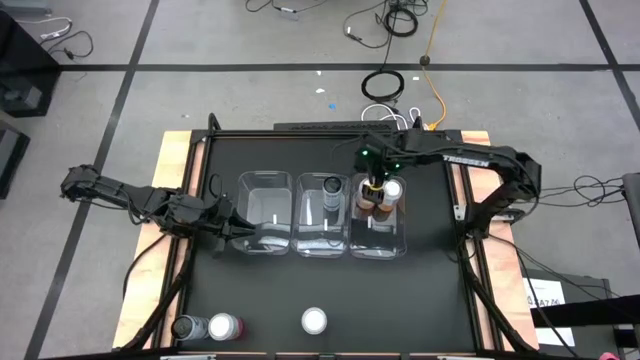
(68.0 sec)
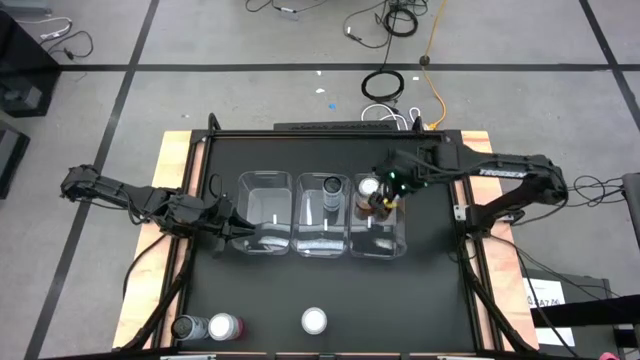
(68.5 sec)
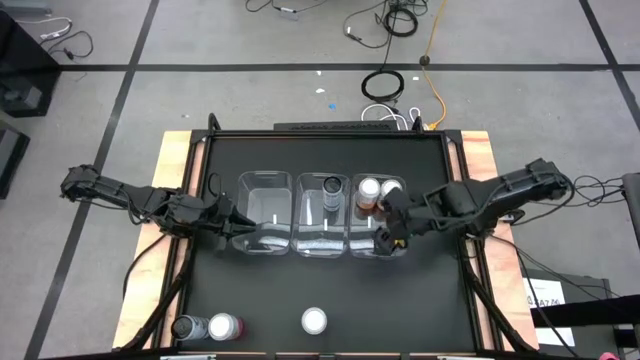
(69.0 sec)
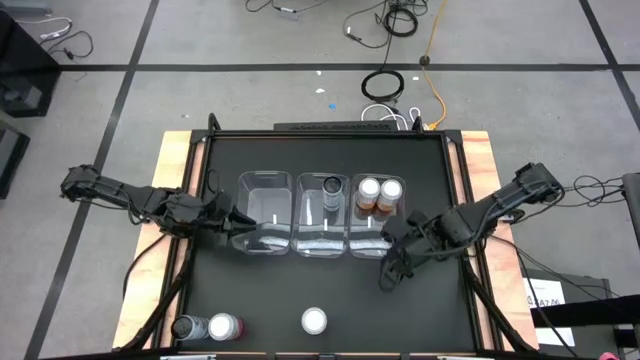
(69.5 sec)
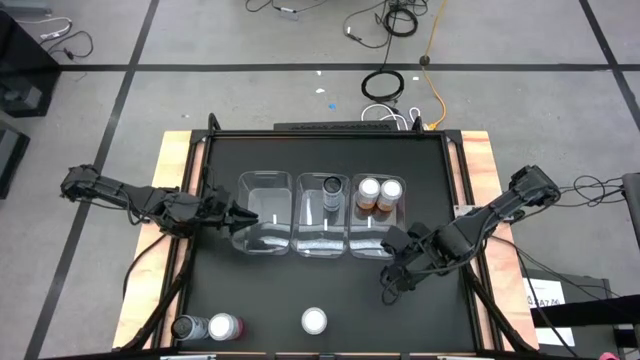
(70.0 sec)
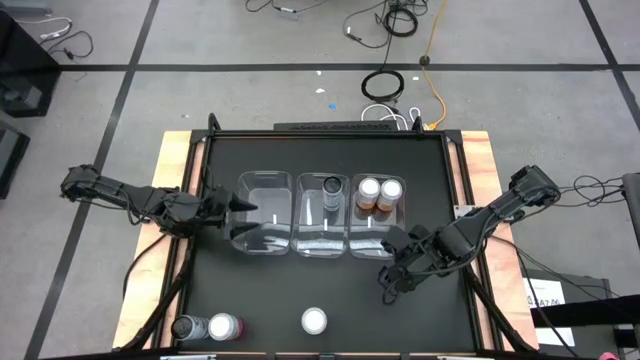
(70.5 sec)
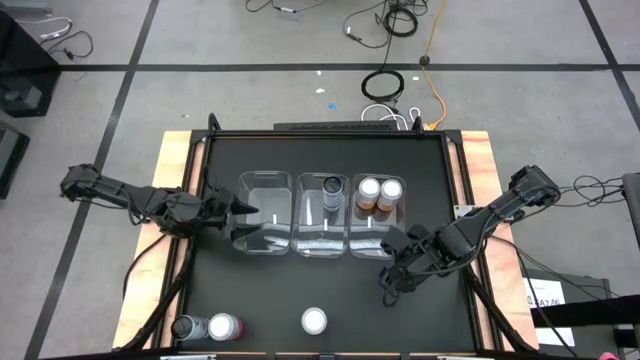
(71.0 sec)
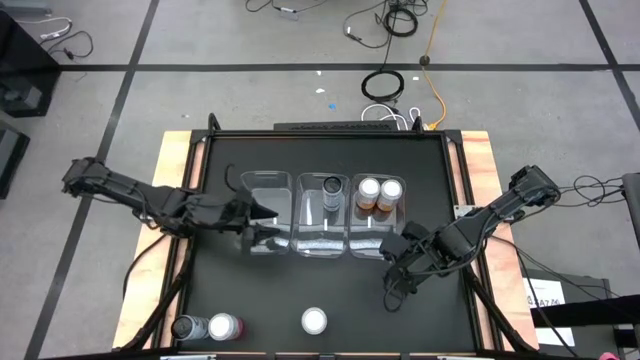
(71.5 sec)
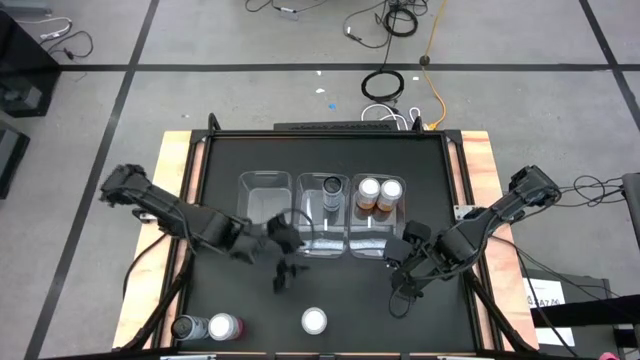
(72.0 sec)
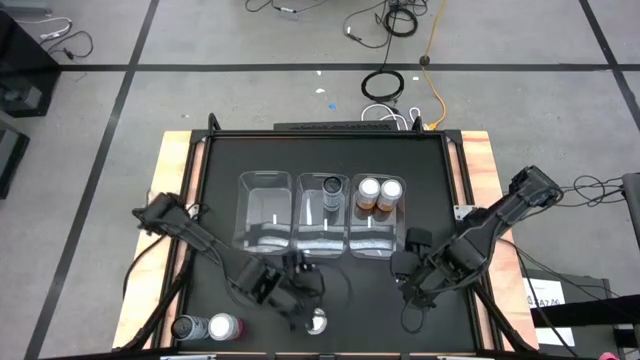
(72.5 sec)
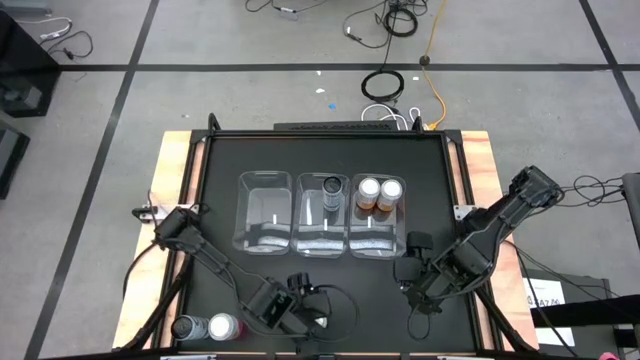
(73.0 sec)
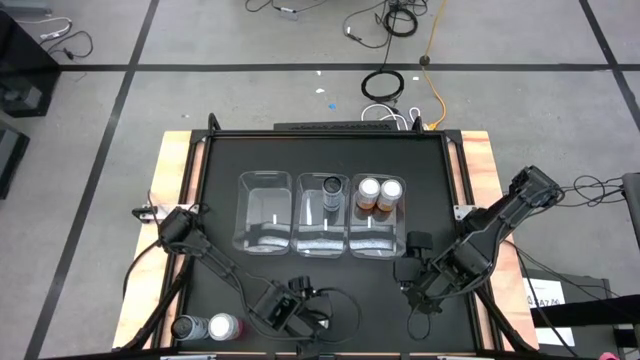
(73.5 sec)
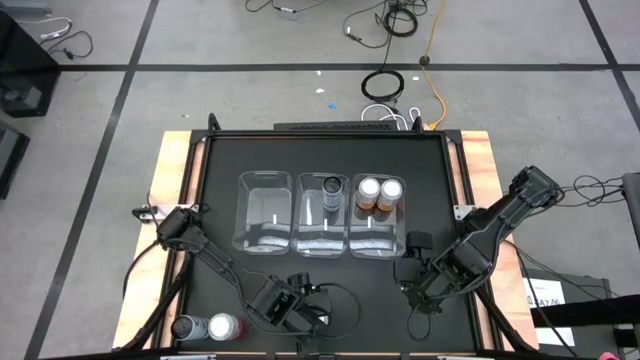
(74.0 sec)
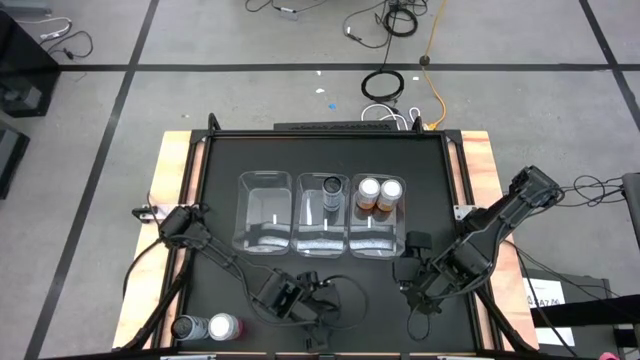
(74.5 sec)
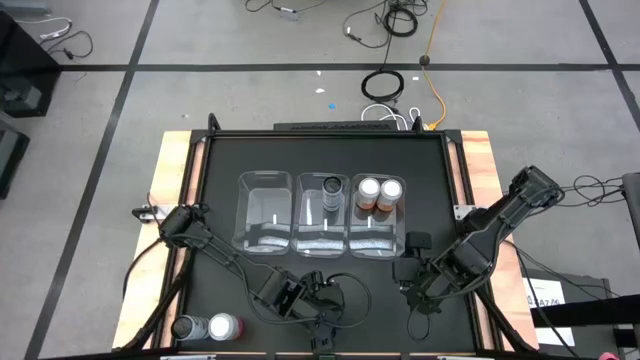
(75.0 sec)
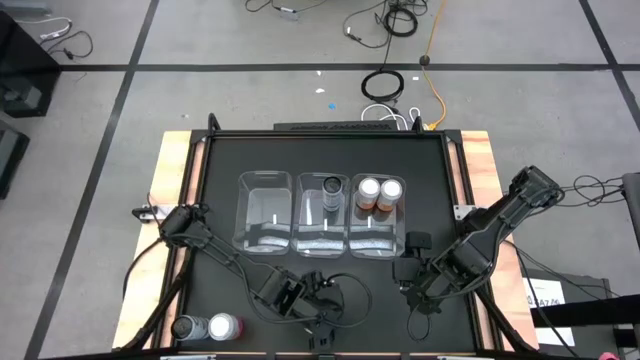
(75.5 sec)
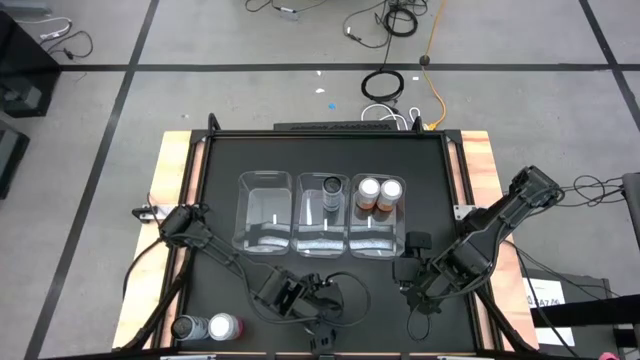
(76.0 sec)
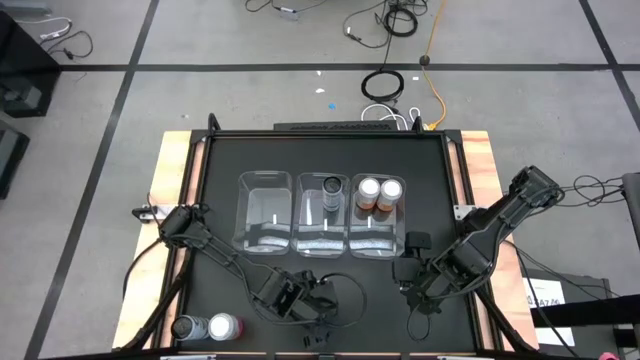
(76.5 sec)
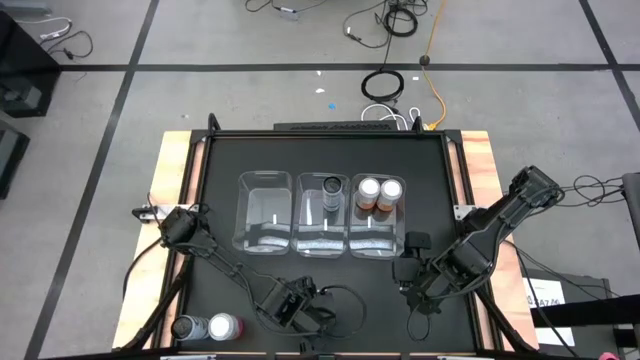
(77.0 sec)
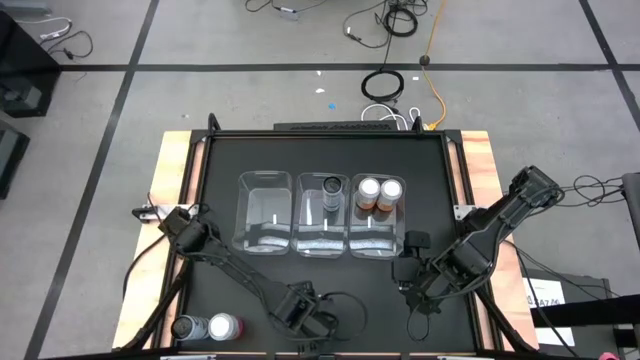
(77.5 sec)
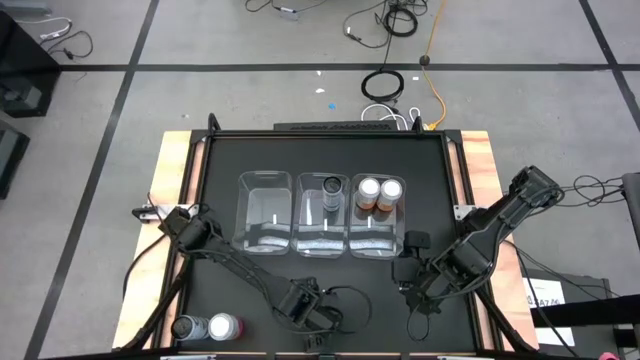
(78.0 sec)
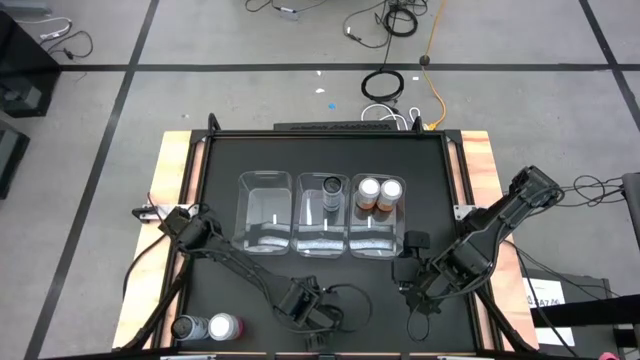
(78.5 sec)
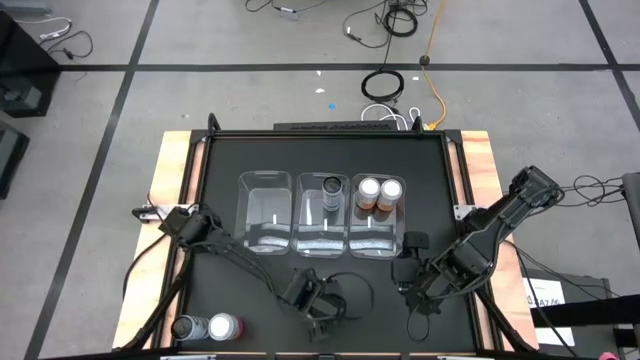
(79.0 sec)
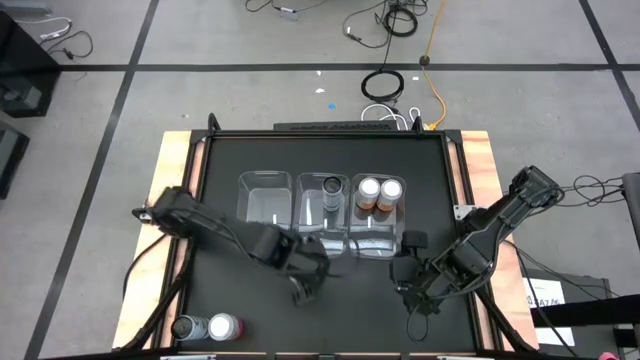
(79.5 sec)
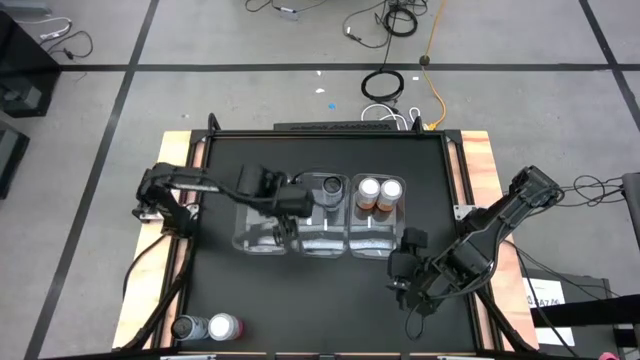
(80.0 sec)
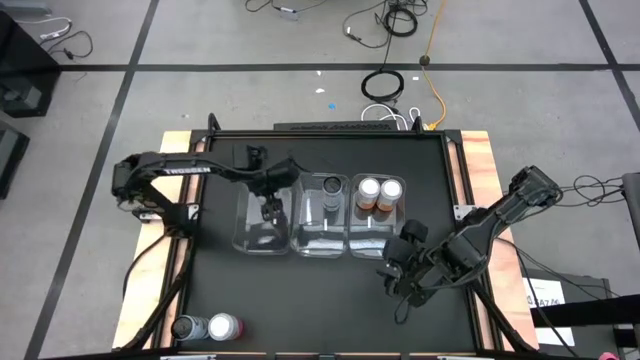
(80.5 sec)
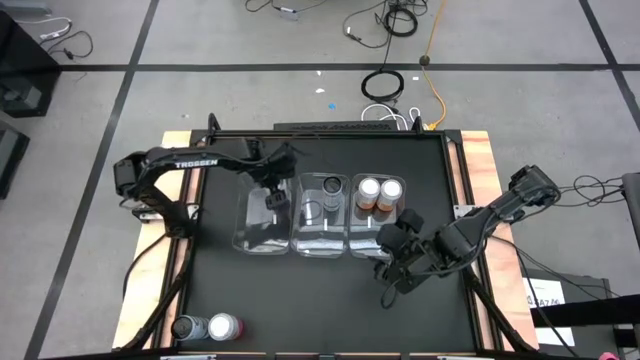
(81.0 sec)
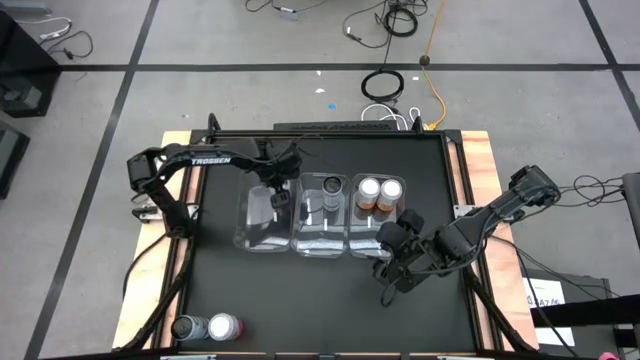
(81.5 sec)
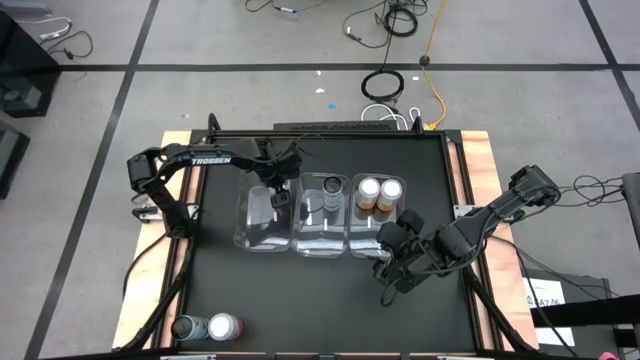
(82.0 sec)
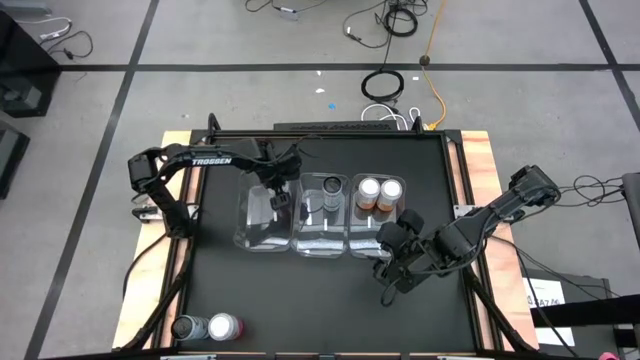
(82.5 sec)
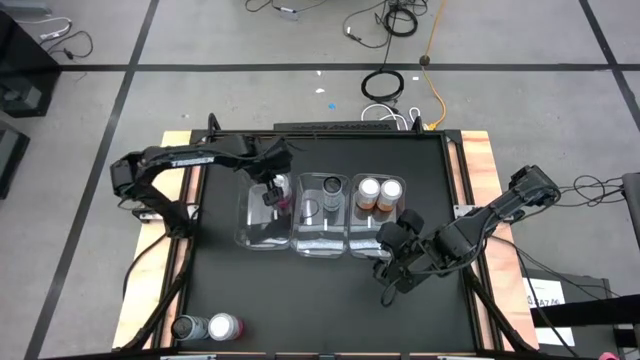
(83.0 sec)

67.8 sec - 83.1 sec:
Task: Sort soda cans
Put the right pink-white soda can in the middle left transparent bin

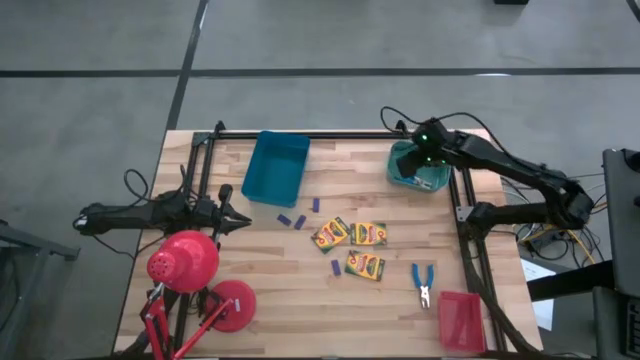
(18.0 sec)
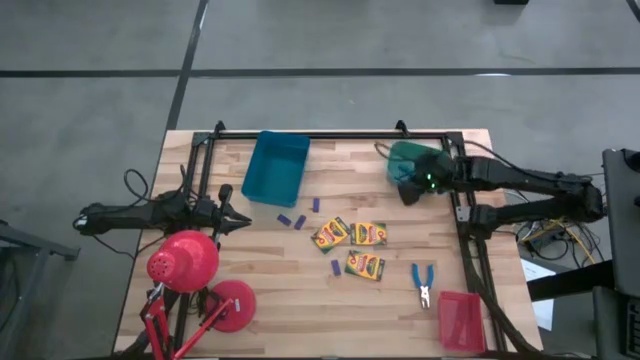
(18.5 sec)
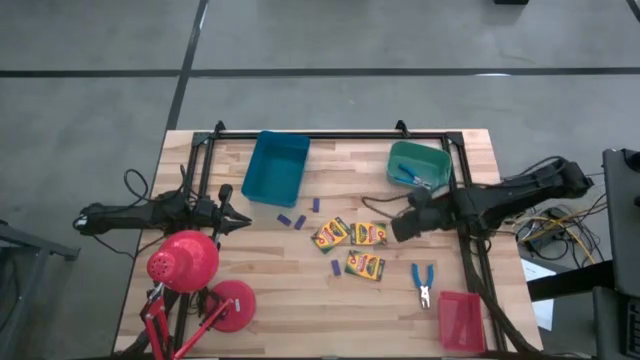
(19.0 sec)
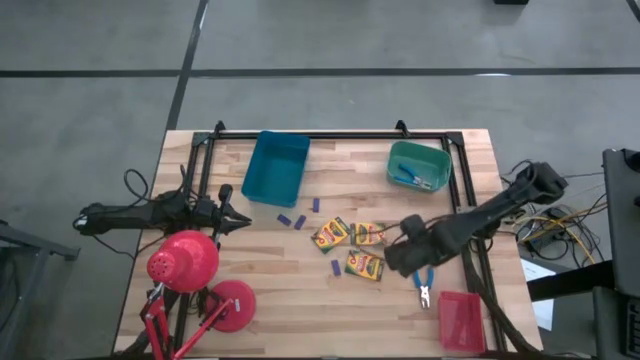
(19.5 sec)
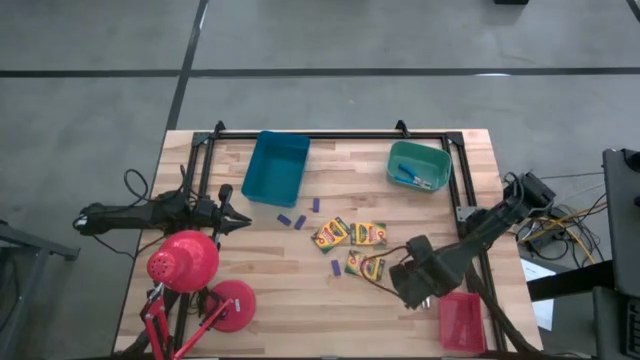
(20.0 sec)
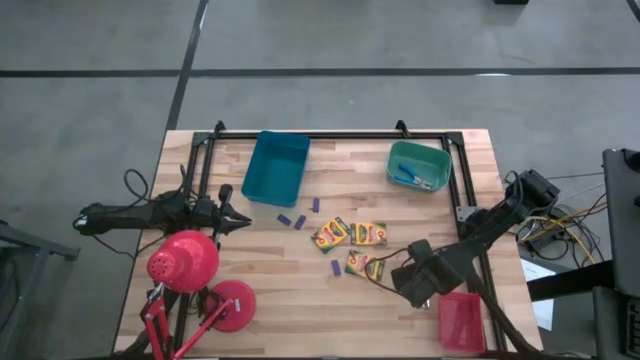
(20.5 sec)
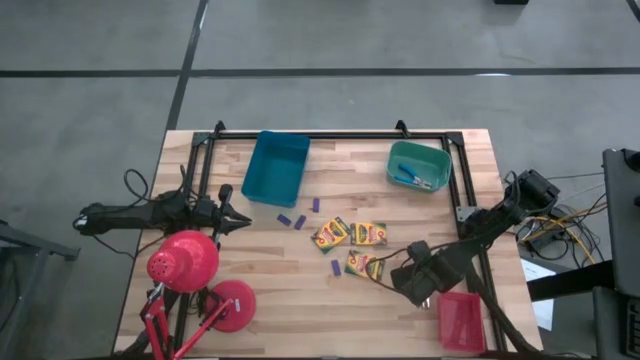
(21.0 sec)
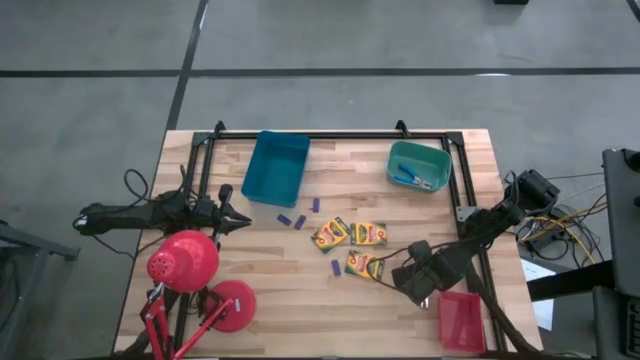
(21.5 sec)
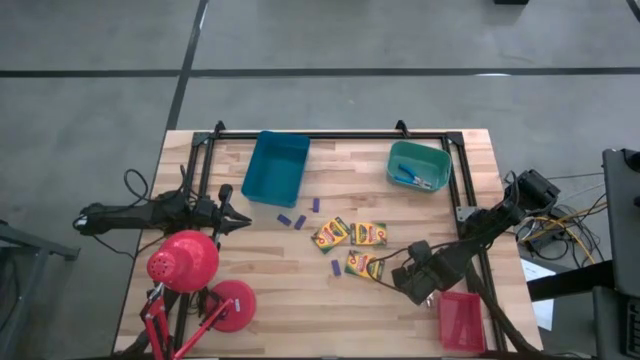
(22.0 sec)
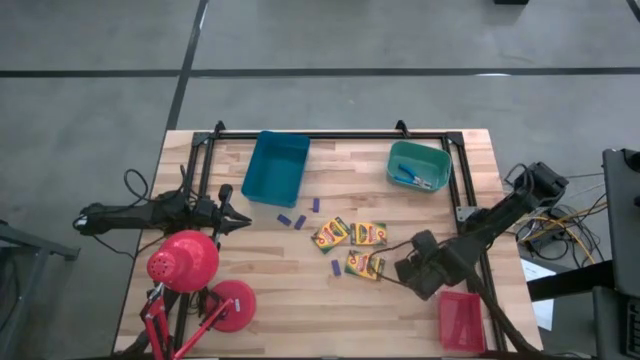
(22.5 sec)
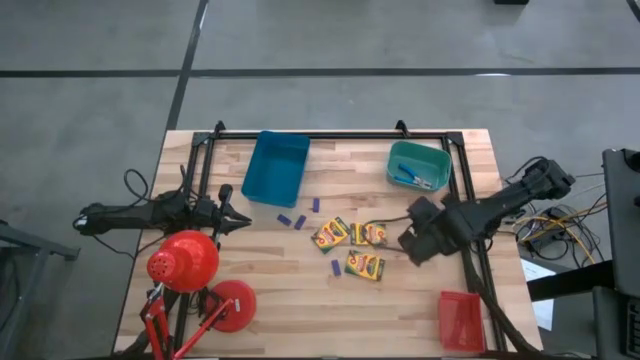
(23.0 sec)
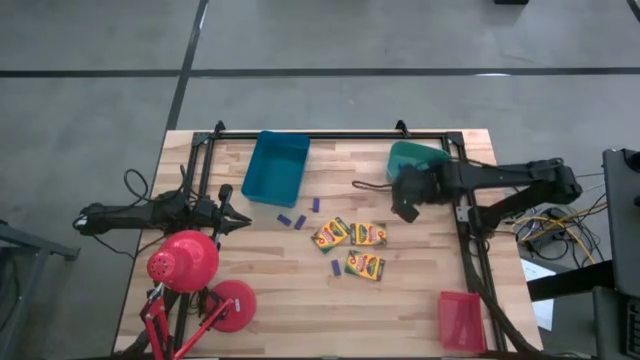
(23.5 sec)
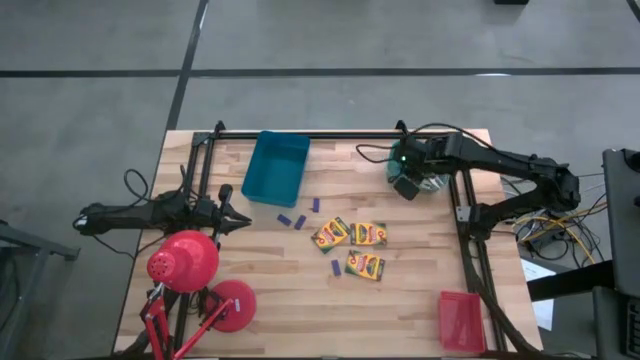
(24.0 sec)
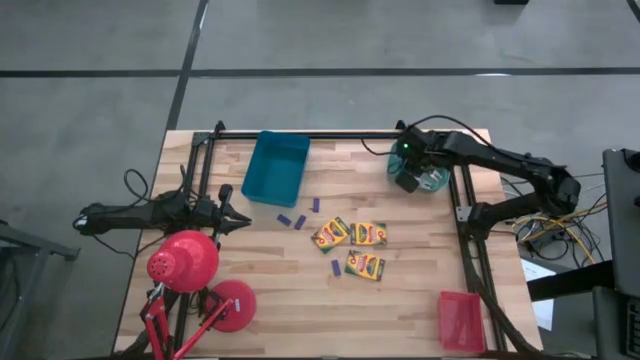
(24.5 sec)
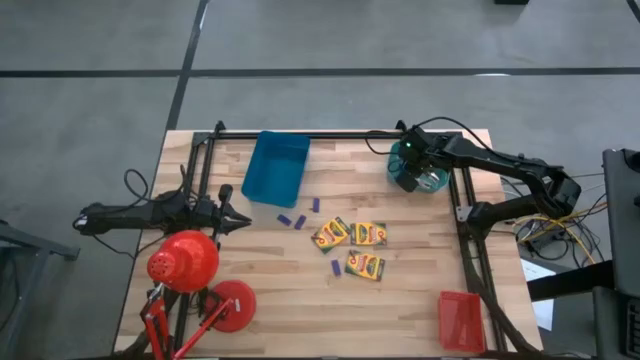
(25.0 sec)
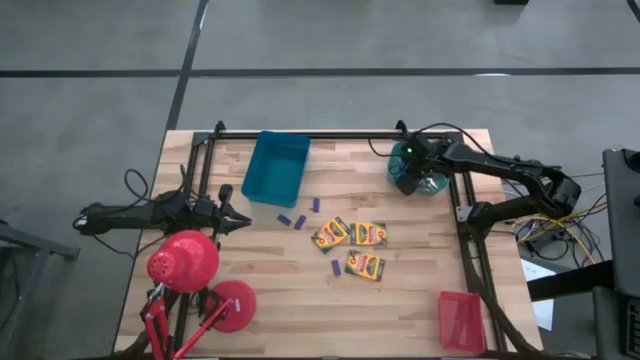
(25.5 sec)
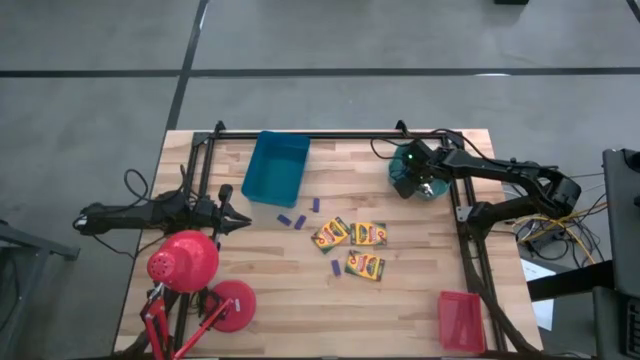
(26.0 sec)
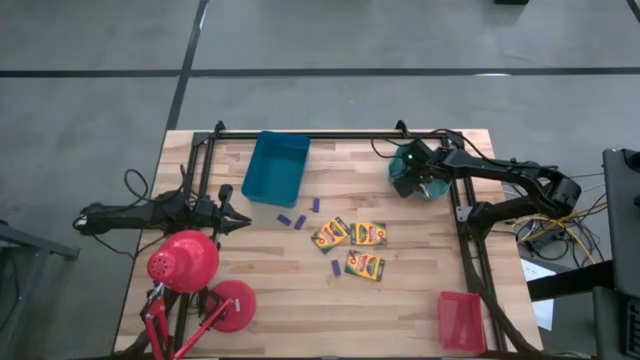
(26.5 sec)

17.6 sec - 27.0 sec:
Task: Pick & Place School Supplies
Put the blue hole puncher into the green bin
